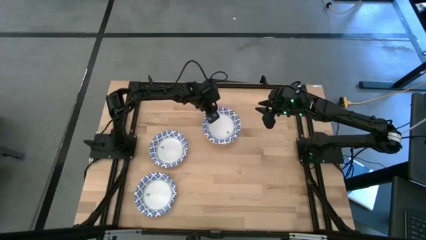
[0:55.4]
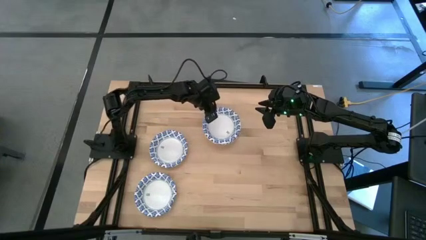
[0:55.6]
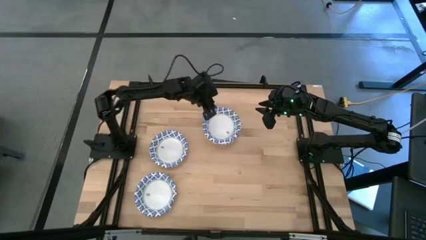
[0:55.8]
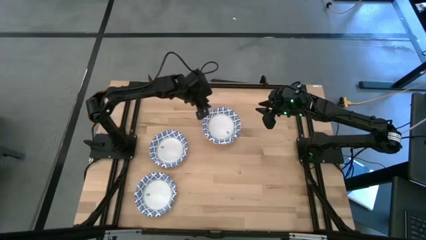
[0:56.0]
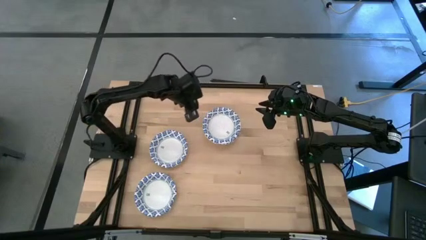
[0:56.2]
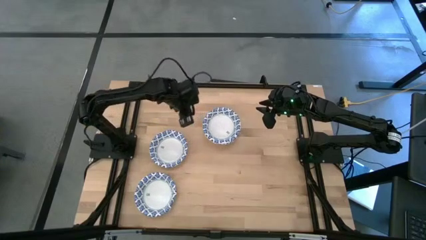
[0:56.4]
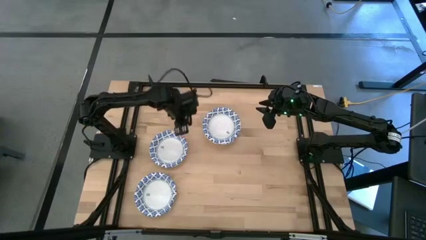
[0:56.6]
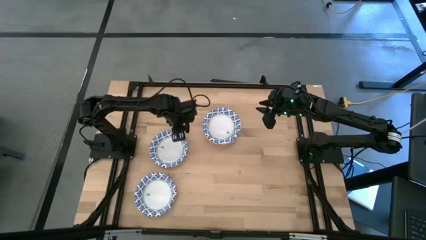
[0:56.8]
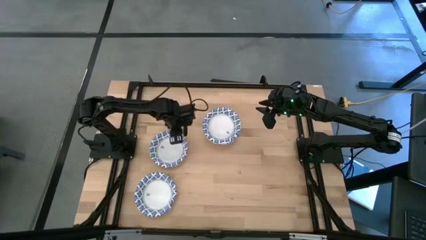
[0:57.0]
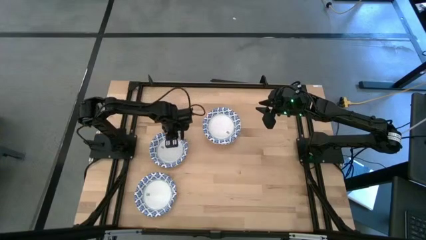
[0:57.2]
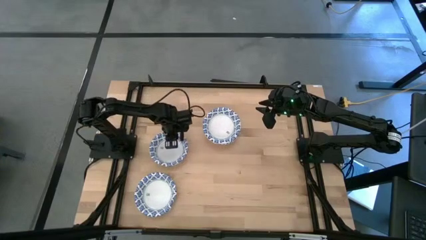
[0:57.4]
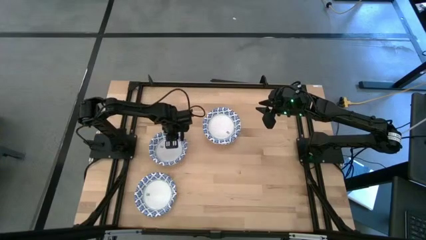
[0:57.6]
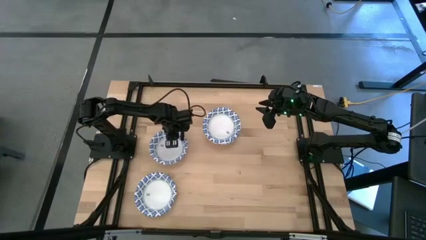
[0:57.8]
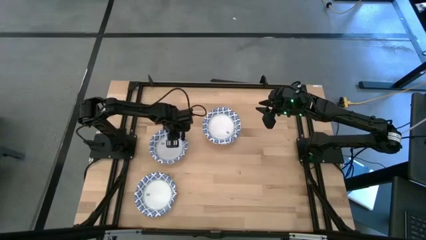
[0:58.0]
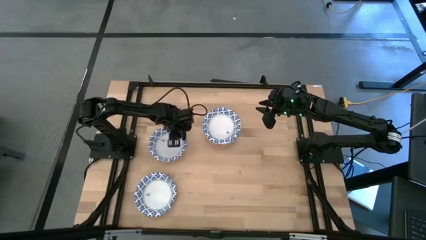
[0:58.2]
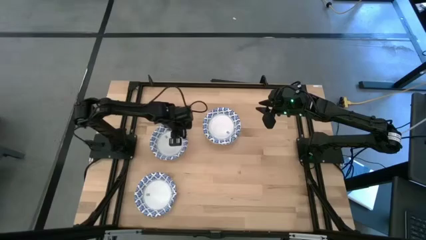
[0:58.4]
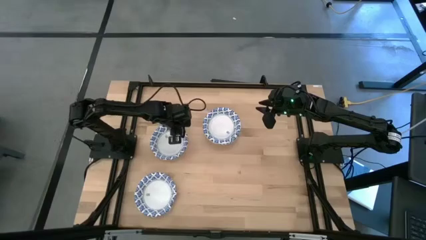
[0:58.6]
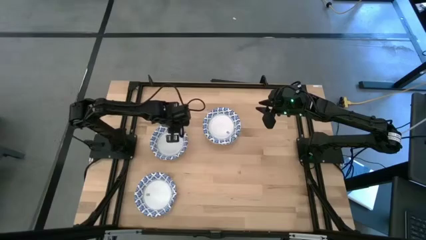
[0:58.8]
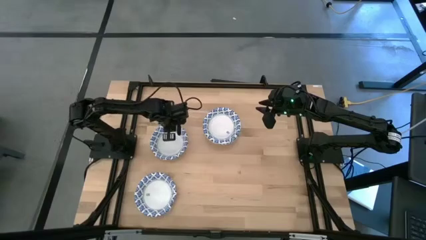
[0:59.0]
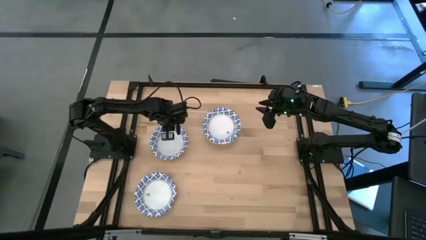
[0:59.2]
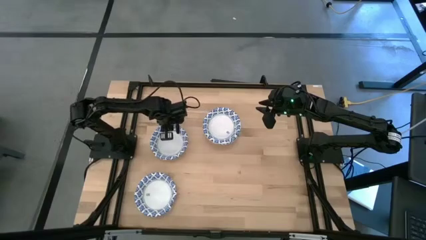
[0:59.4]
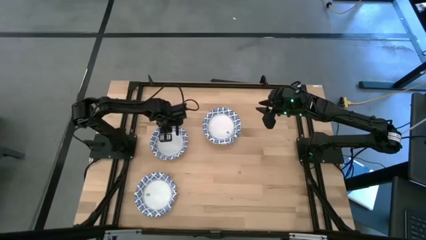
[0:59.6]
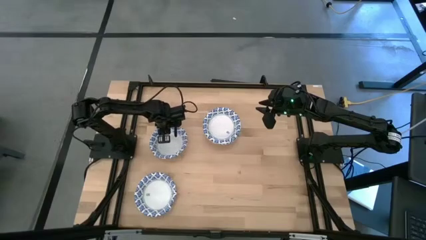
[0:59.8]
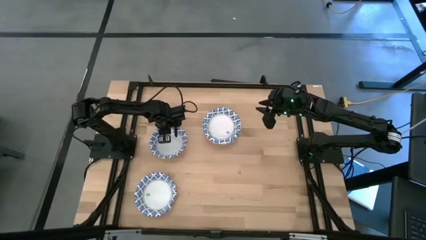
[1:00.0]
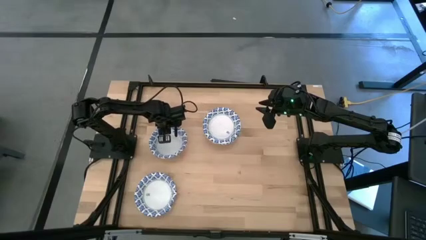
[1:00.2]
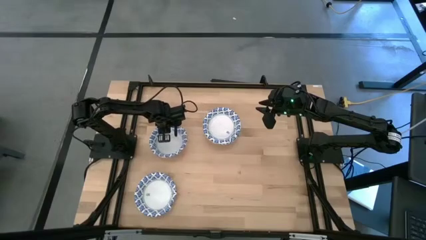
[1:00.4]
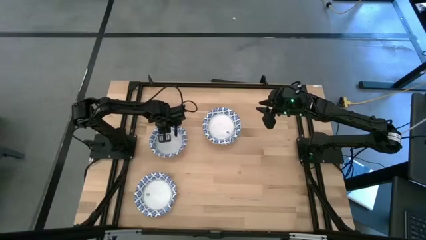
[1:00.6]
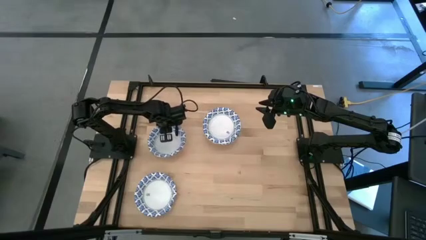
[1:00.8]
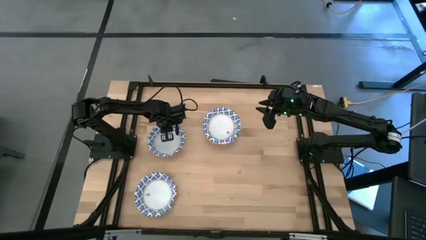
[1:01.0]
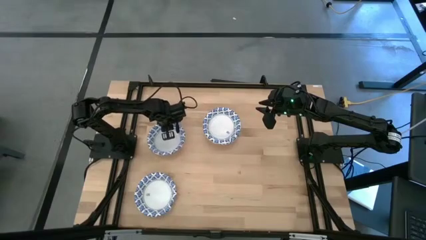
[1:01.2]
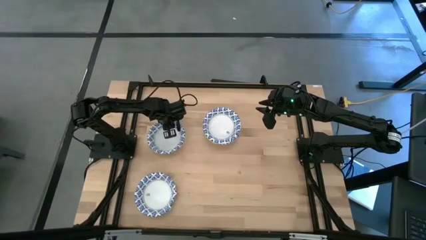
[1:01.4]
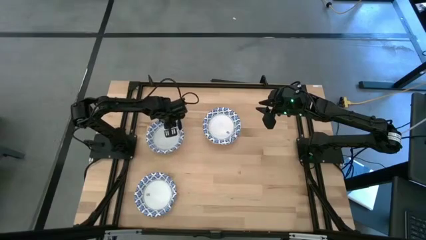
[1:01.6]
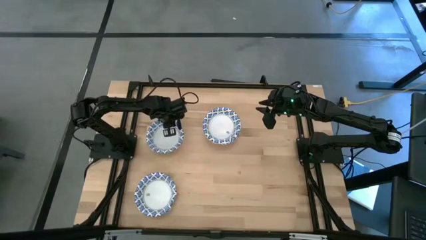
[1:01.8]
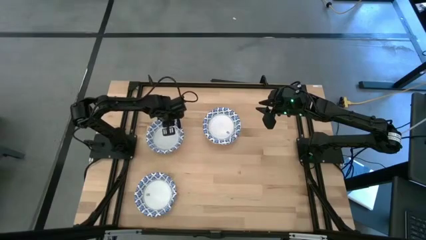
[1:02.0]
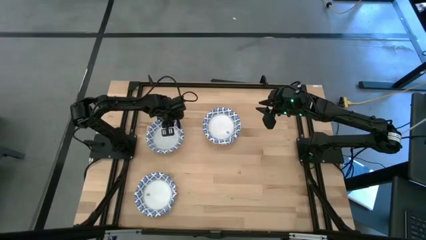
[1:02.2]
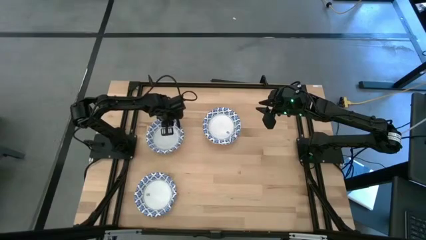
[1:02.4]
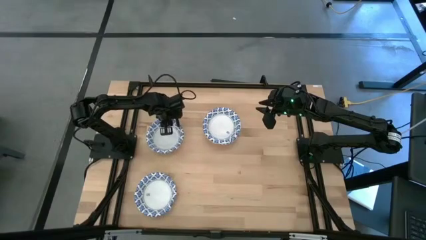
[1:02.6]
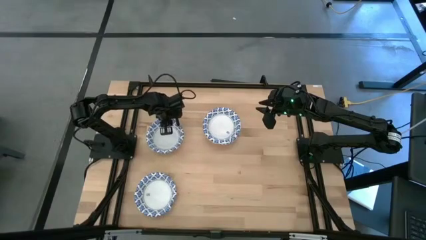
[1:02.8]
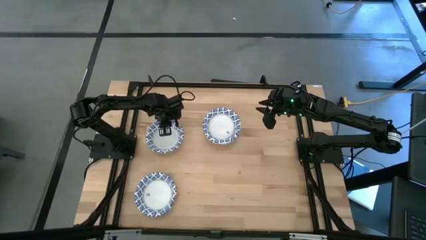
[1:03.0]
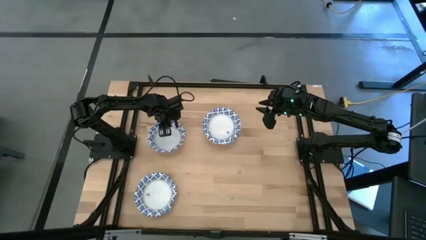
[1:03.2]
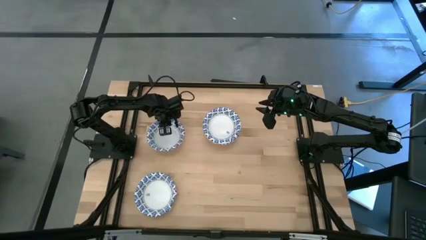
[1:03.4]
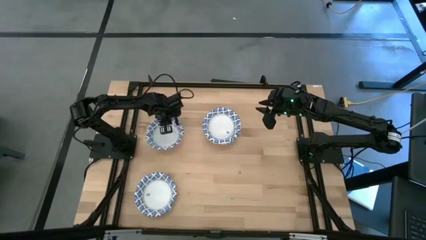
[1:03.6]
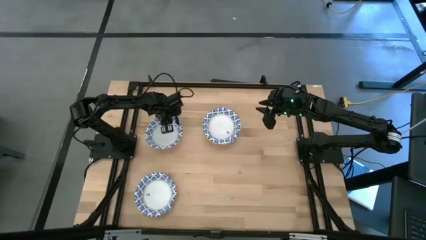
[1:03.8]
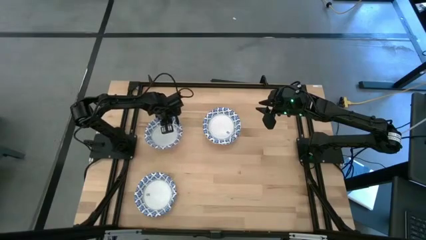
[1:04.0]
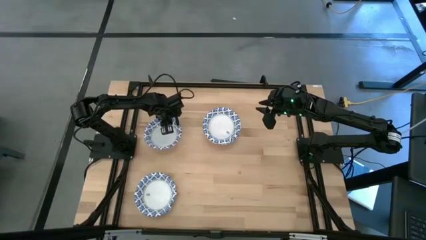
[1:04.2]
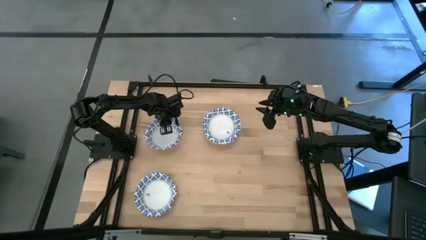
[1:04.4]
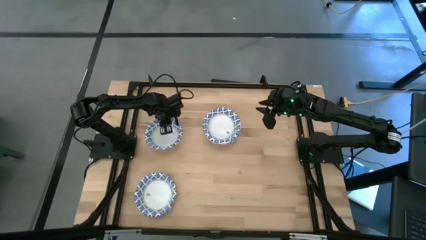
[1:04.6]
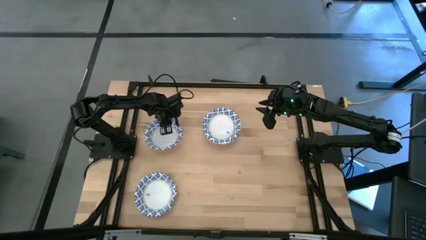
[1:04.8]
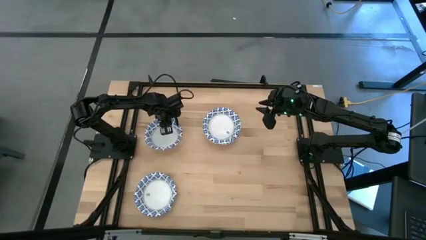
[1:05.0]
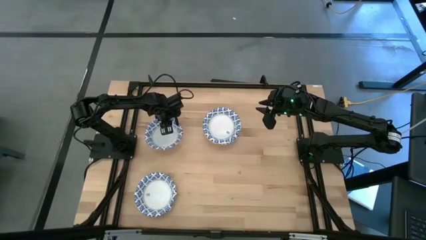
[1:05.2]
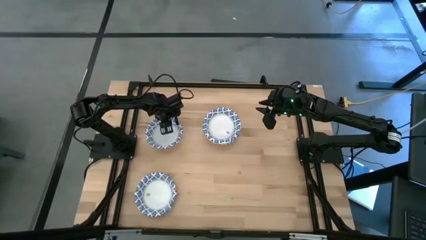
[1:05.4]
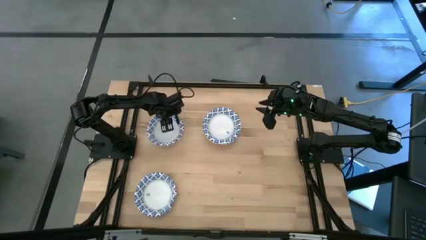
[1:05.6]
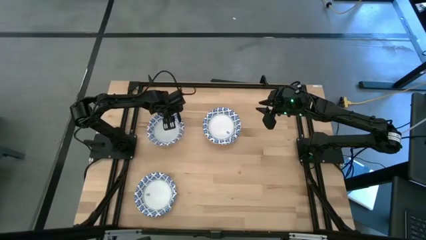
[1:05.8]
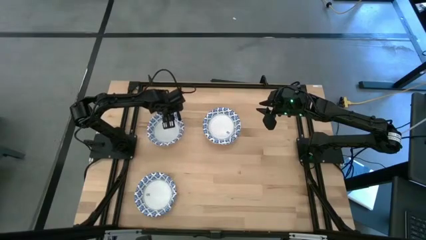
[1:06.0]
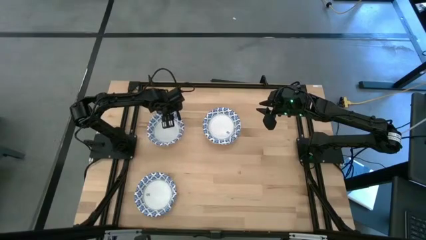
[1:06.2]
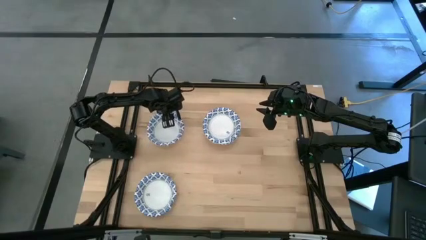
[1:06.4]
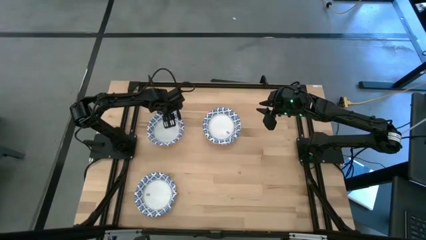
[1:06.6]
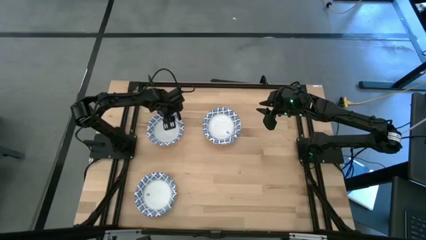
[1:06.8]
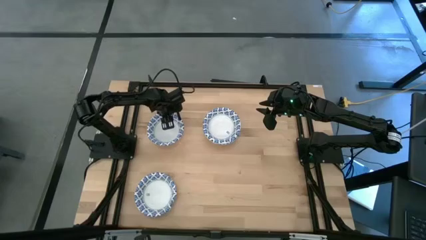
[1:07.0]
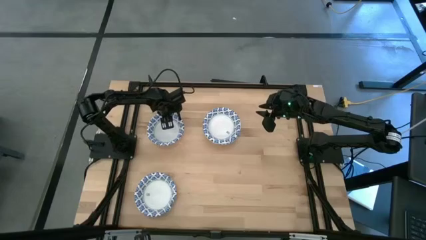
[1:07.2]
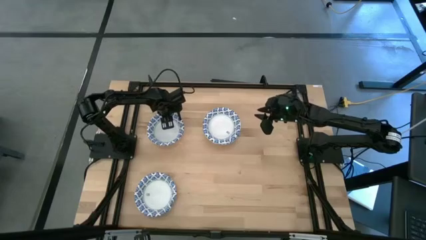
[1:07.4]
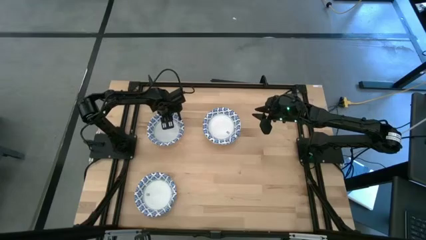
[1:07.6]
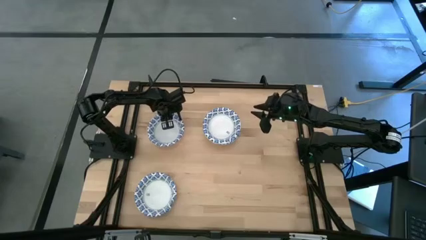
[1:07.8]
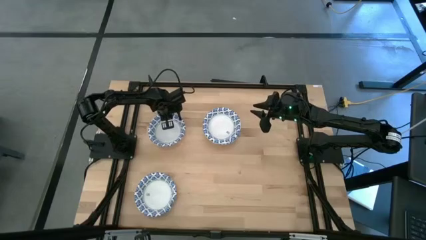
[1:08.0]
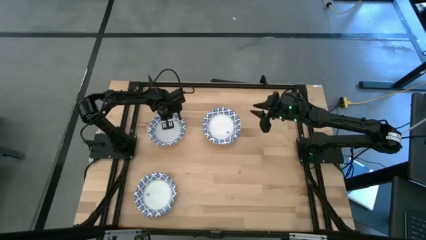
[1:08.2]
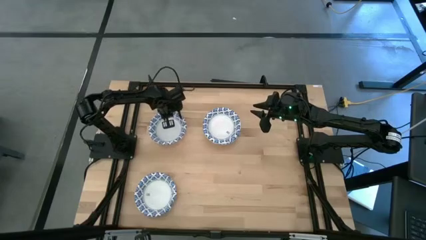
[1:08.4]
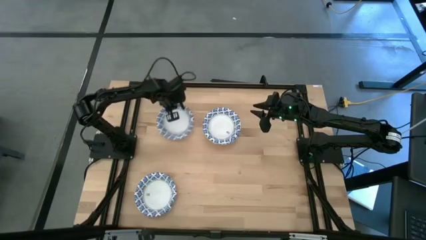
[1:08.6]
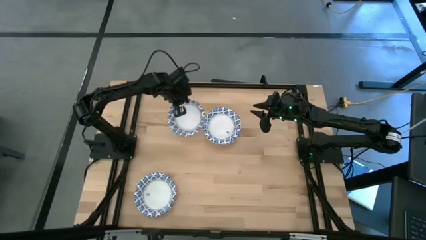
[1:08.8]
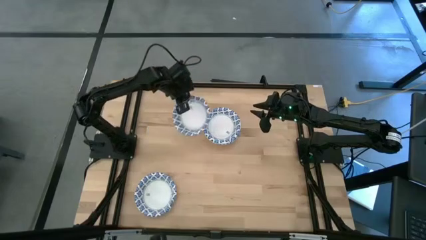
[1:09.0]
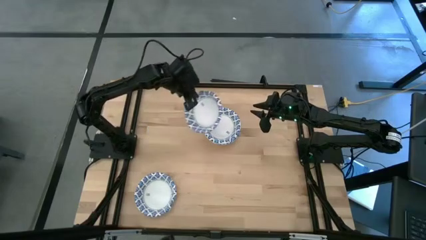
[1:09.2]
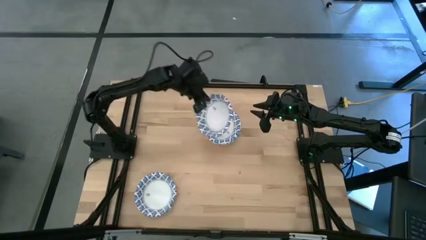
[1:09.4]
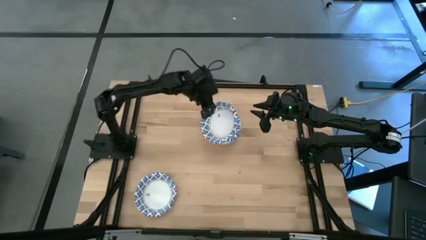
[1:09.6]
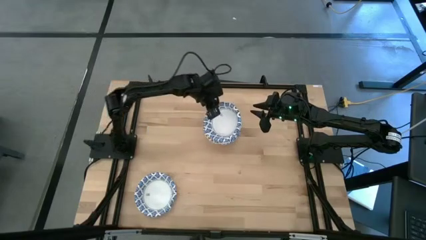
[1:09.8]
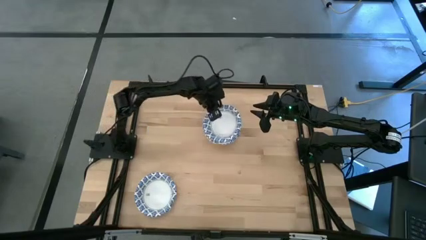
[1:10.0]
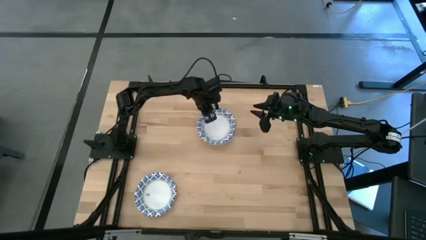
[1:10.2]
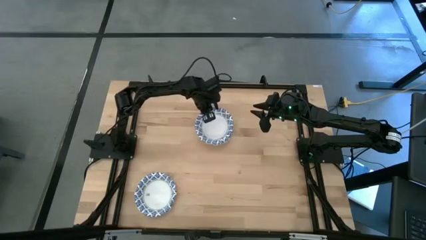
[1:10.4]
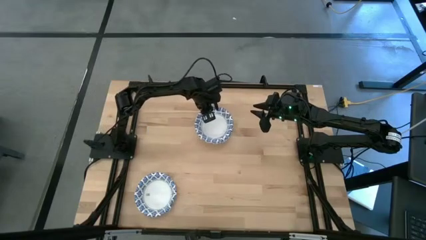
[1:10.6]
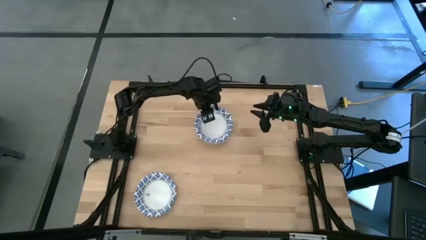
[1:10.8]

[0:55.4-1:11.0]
Task: Nest bowls inside each other
Stack the top bowl on top of the bowl on the table

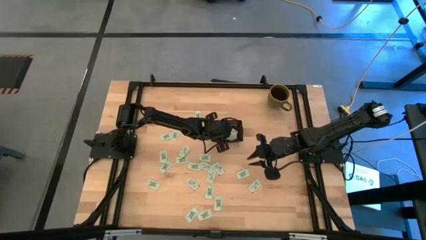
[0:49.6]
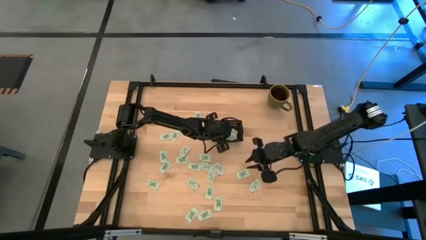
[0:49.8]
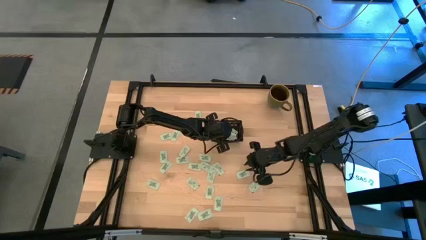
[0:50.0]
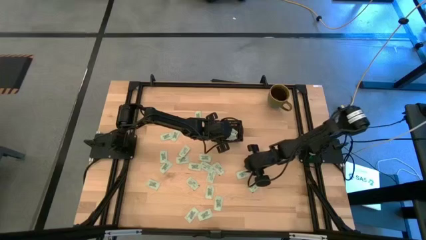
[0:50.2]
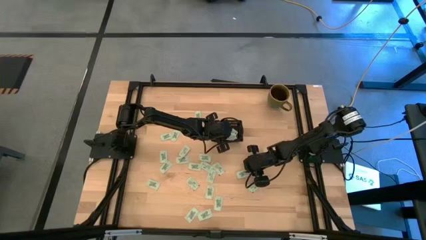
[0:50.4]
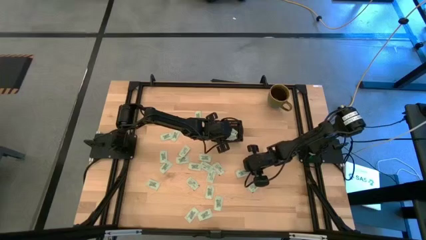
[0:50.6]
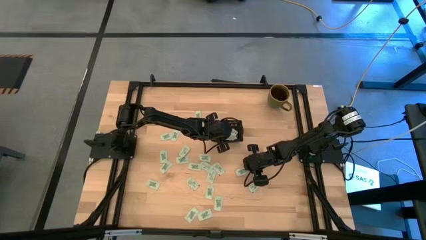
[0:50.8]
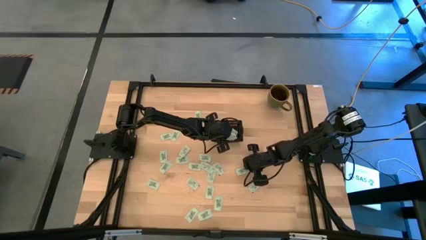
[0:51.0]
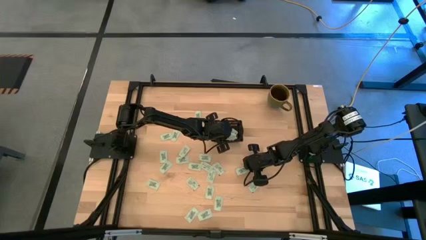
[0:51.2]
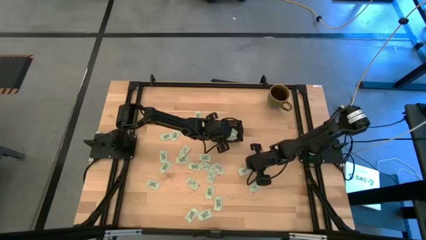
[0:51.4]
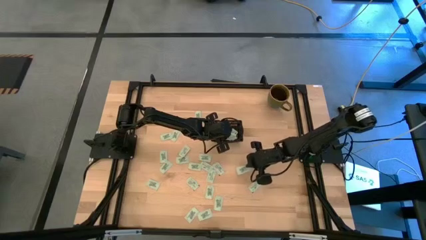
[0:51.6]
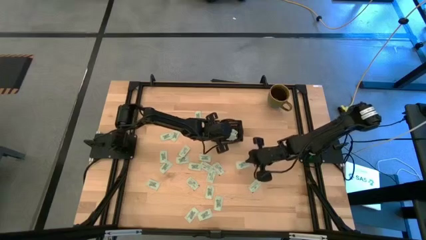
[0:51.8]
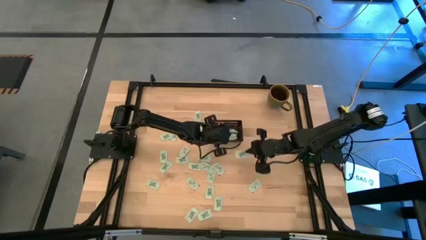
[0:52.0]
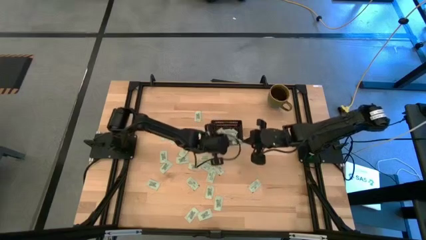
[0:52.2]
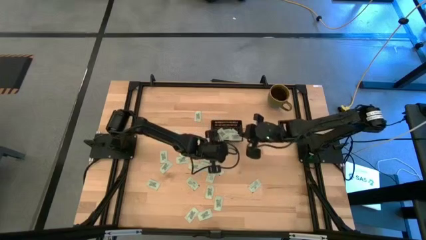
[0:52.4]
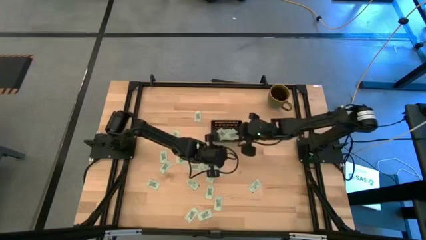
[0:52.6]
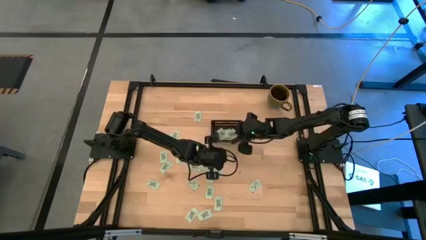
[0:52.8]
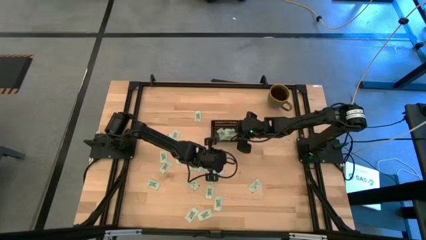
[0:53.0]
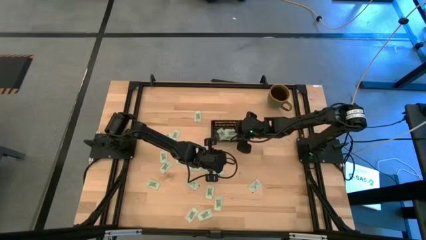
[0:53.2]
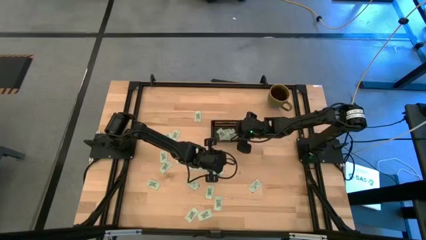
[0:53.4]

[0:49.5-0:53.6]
Task: Pick and place Stevia / Truvia into bins
Put the stevia packet into the black basket
